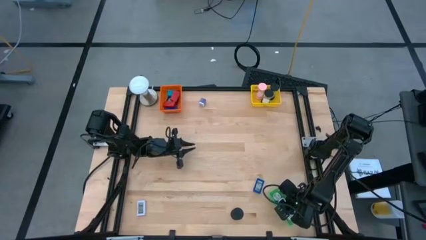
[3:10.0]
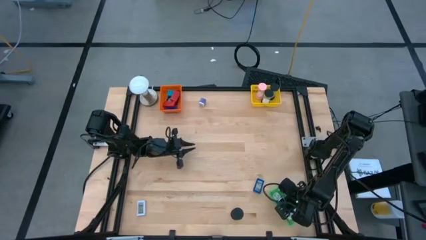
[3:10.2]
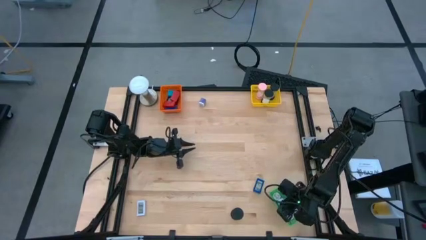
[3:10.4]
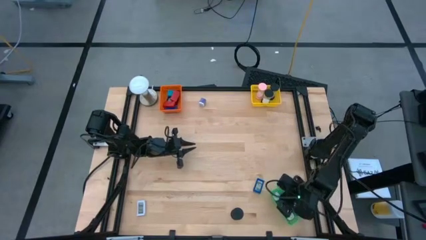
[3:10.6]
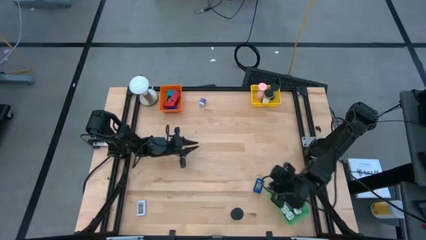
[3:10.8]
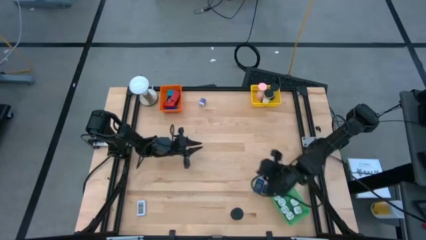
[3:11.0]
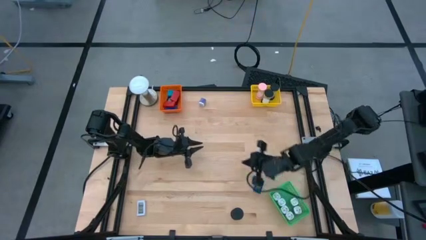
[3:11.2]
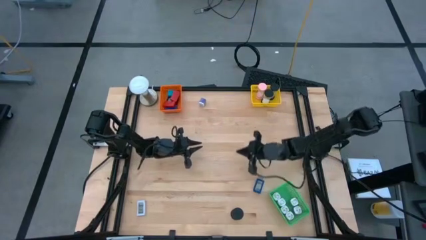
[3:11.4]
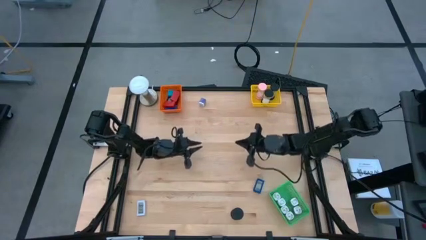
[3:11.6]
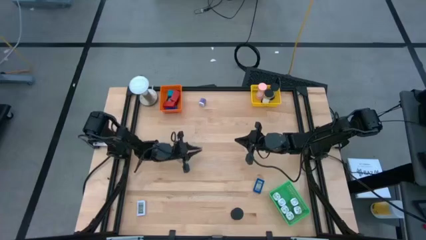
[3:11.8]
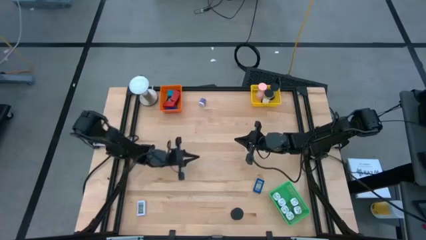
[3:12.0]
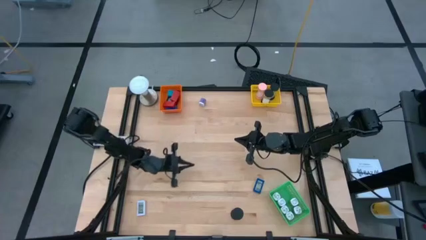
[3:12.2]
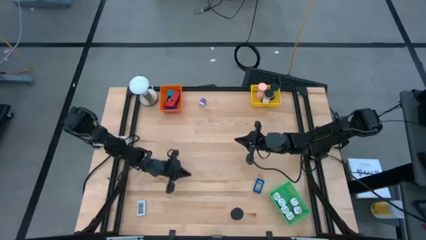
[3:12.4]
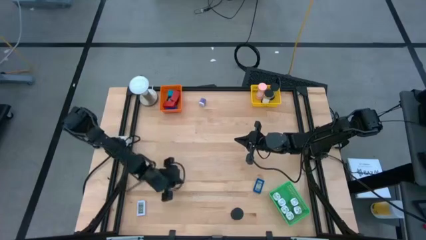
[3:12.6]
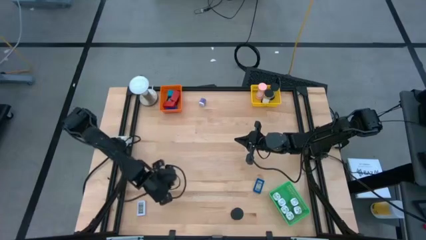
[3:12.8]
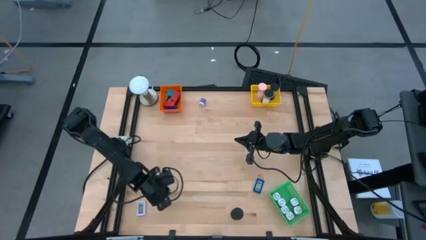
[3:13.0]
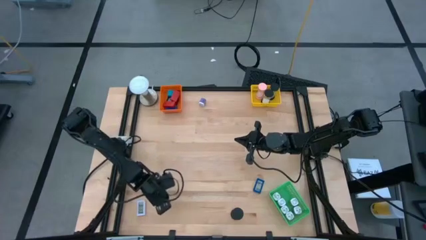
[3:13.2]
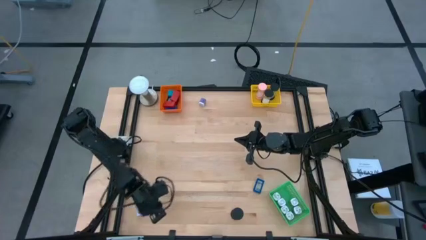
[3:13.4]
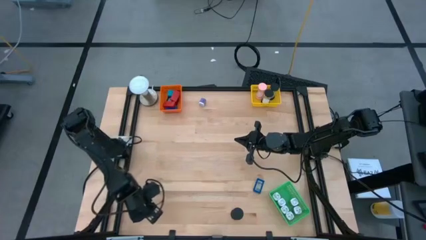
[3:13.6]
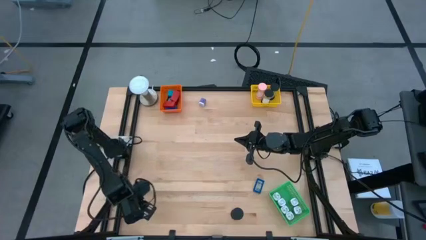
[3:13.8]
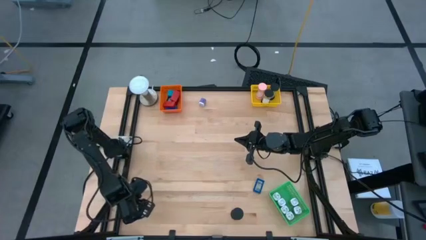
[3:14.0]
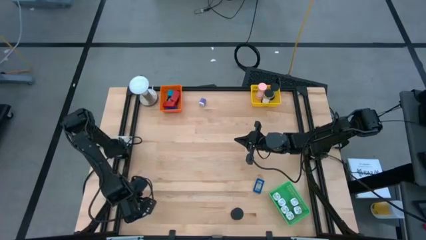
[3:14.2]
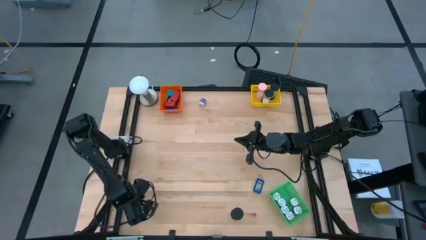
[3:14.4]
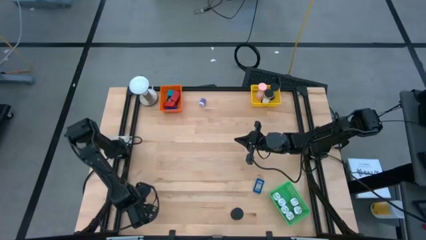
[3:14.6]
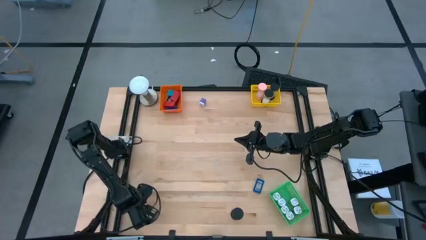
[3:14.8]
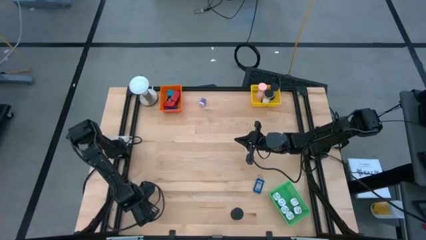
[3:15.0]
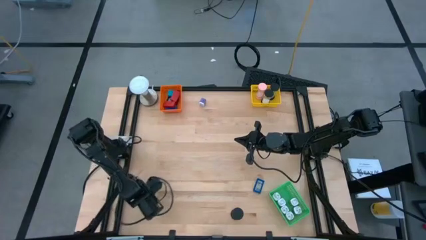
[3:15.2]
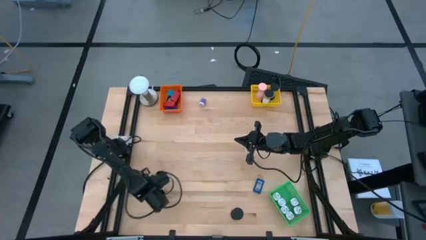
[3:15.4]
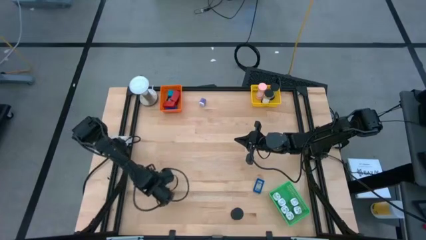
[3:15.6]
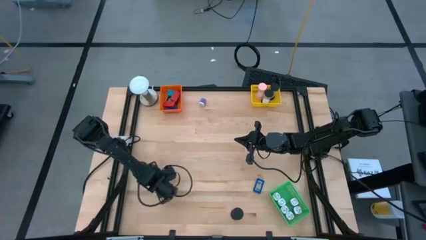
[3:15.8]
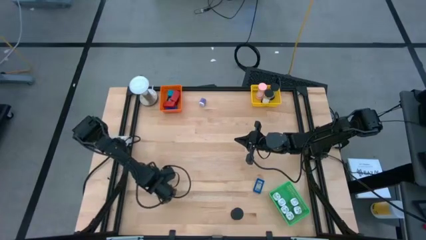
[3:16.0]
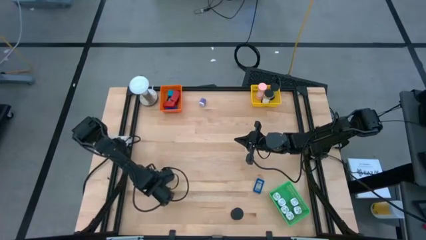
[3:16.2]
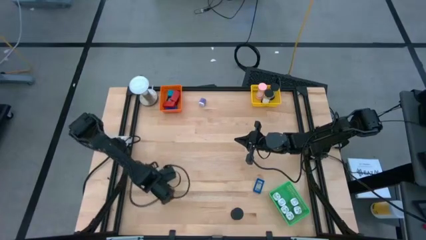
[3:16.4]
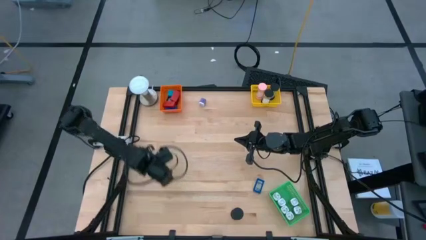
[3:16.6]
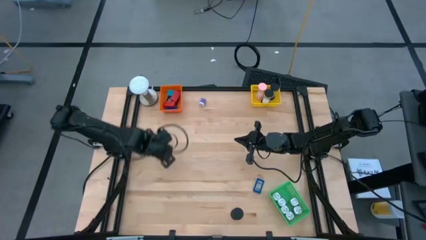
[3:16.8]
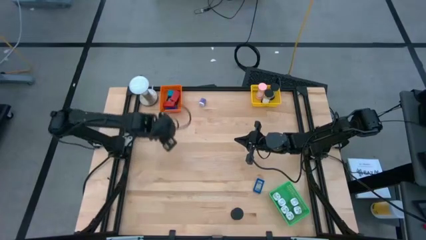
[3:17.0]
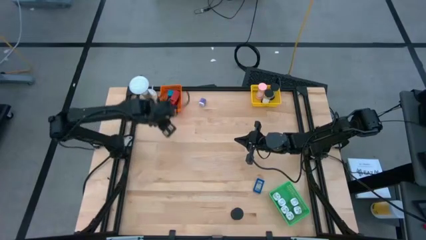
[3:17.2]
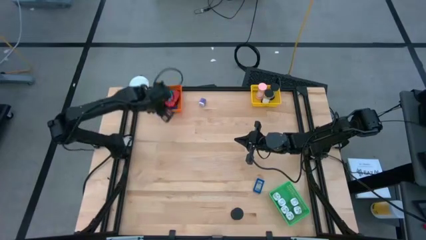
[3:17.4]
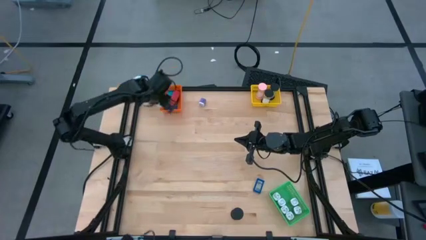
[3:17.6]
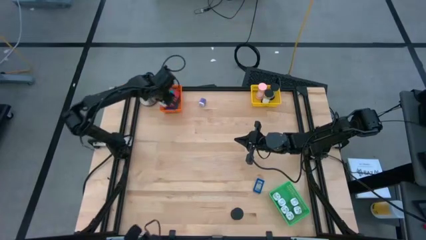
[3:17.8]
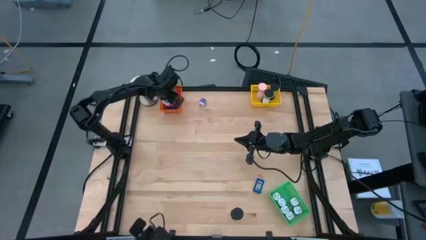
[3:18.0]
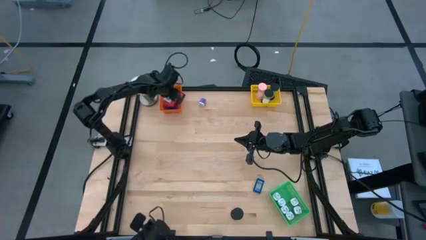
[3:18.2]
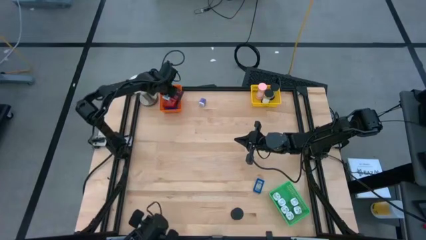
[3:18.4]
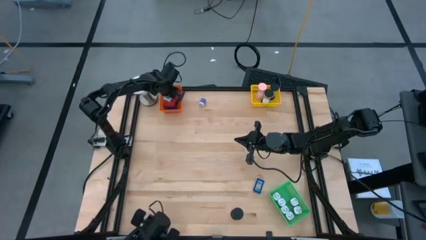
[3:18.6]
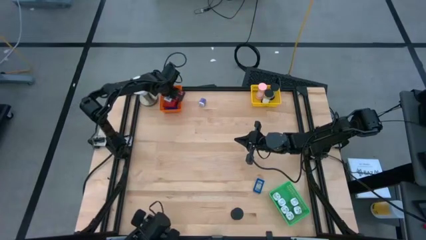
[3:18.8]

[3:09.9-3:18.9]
Task: Pick & Place Office items
Put the white digital clock into the orange bin

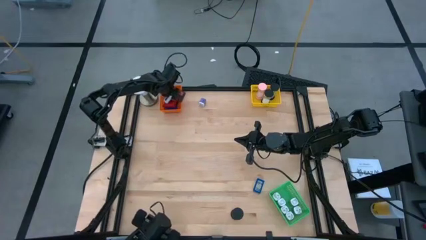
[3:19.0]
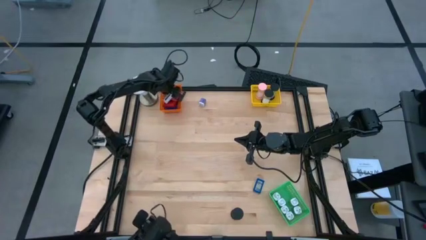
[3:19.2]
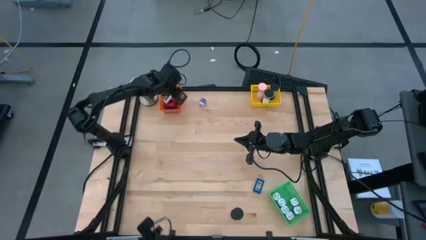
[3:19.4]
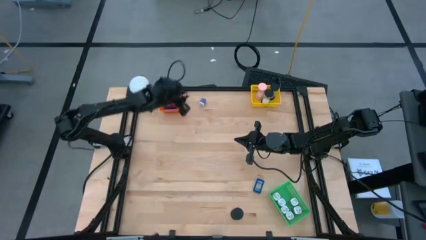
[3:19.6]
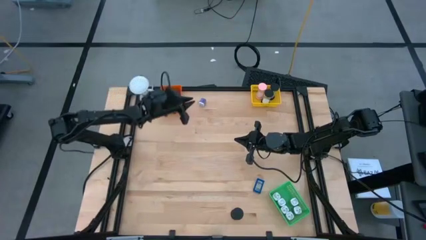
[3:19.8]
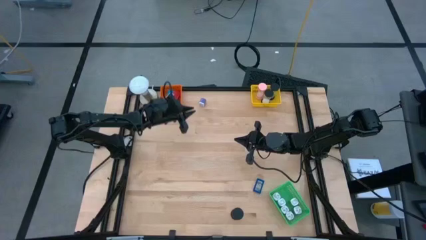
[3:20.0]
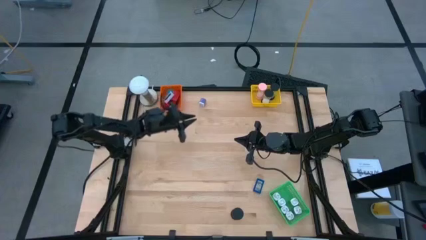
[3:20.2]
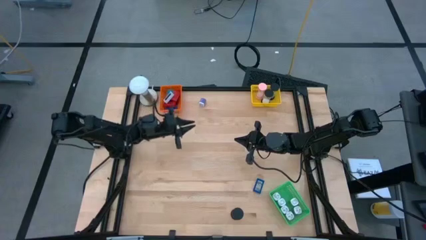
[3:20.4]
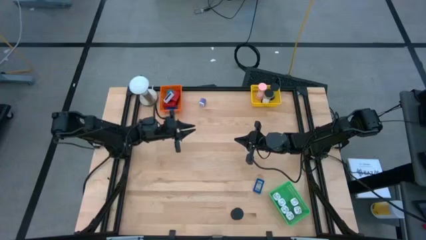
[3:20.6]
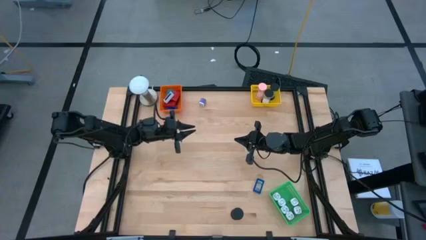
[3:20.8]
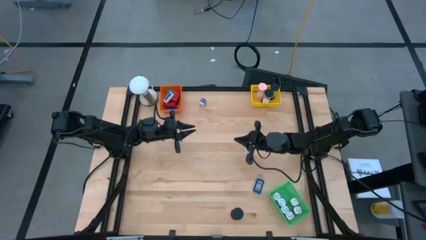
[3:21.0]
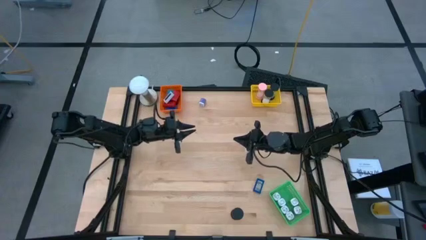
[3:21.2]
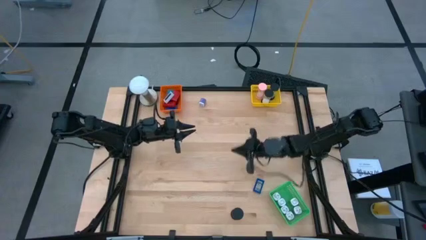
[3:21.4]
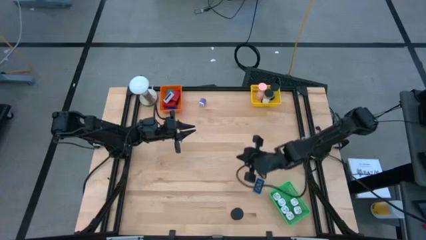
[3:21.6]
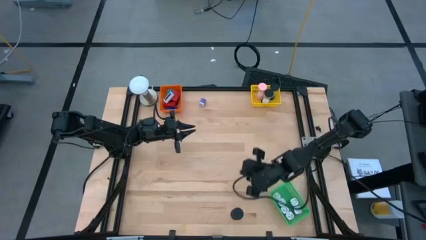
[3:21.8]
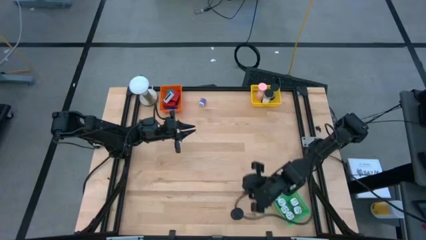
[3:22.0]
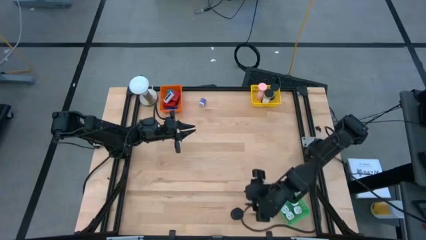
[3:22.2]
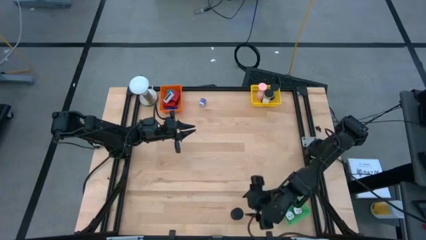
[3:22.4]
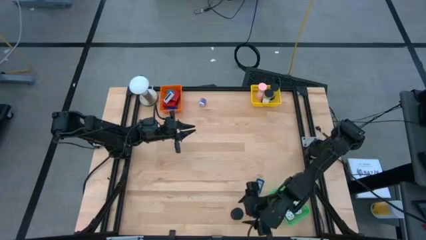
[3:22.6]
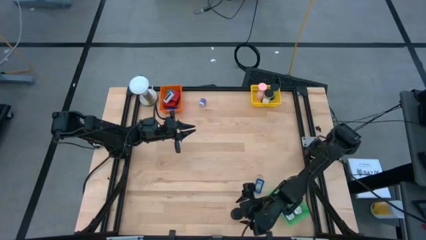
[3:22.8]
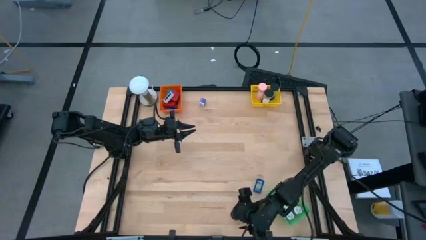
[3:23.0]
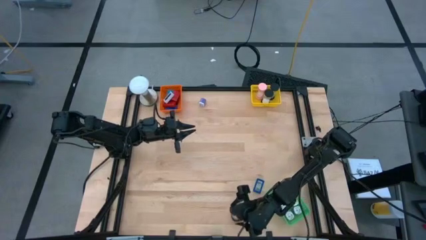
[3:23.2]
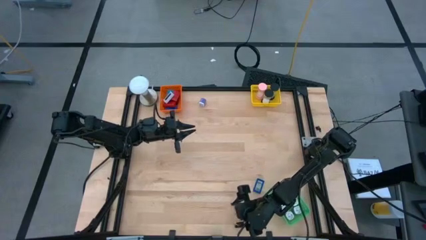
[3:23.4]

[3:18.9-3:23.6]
Put the orange hourglass into the yellow bin

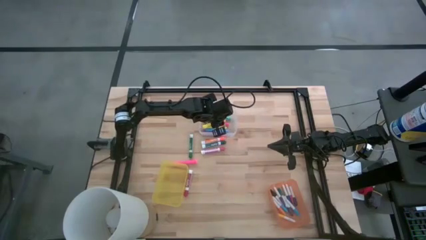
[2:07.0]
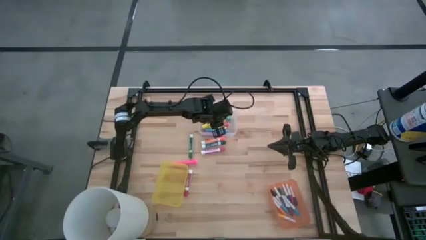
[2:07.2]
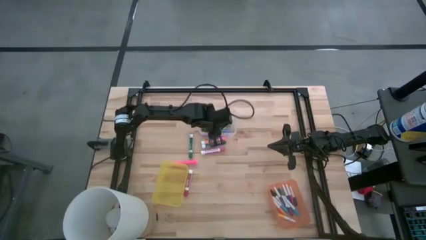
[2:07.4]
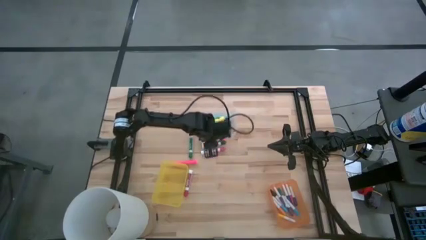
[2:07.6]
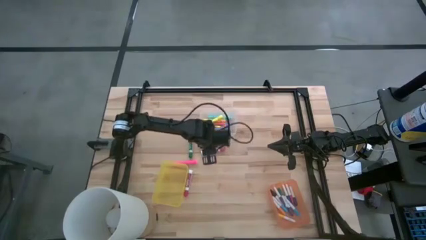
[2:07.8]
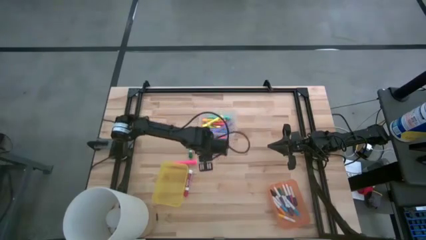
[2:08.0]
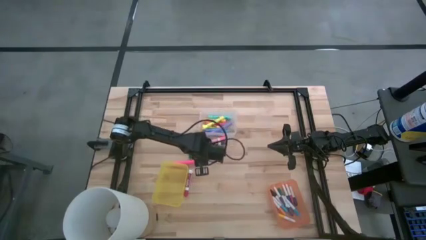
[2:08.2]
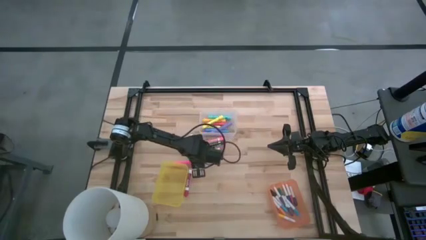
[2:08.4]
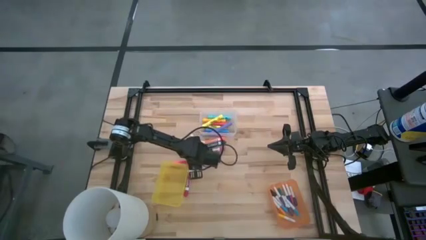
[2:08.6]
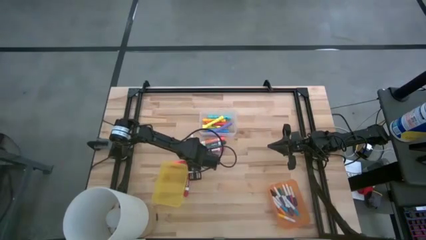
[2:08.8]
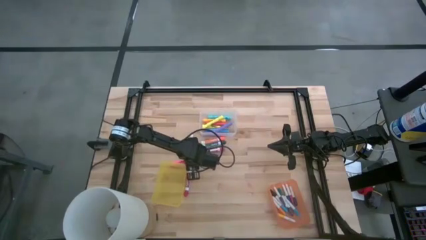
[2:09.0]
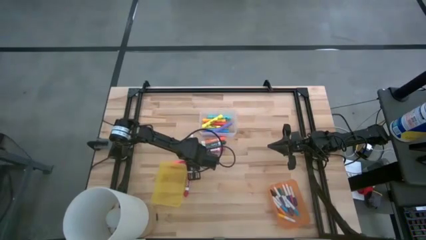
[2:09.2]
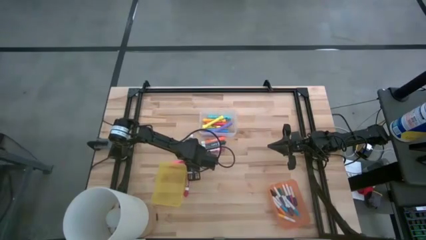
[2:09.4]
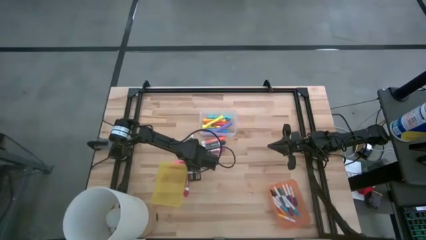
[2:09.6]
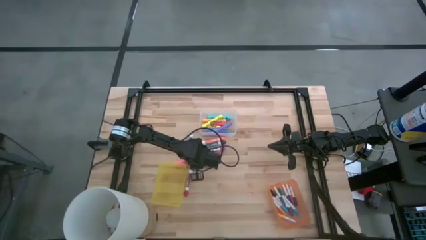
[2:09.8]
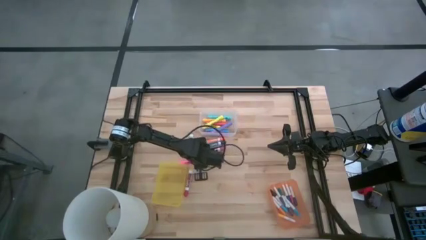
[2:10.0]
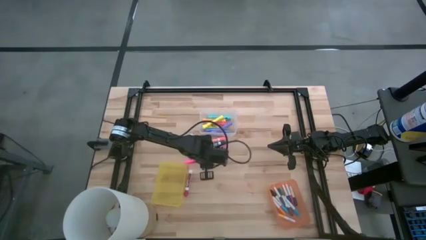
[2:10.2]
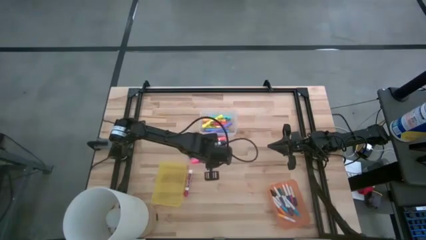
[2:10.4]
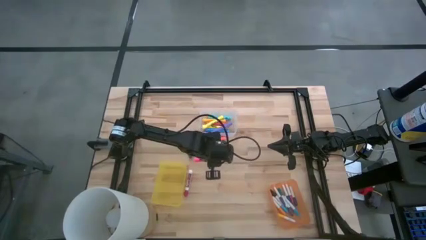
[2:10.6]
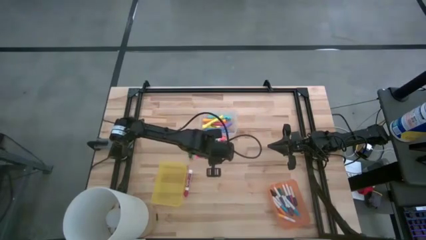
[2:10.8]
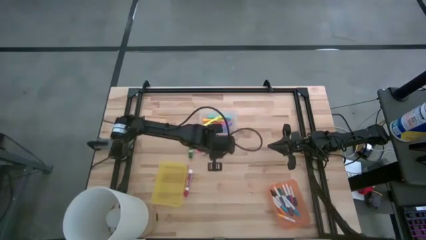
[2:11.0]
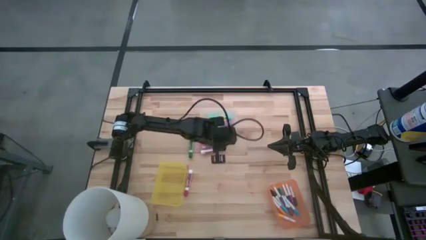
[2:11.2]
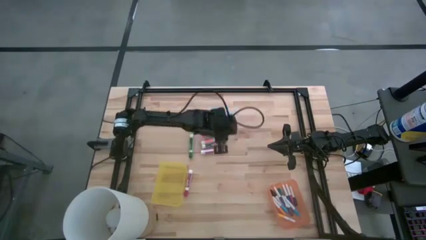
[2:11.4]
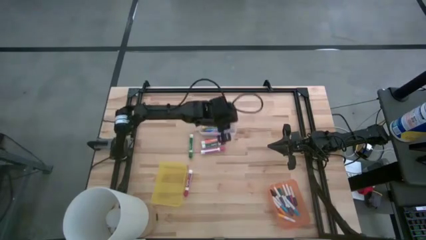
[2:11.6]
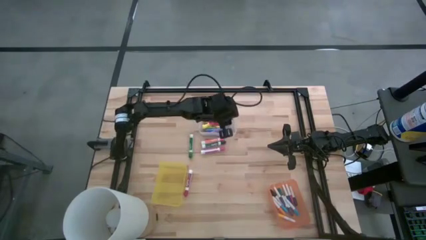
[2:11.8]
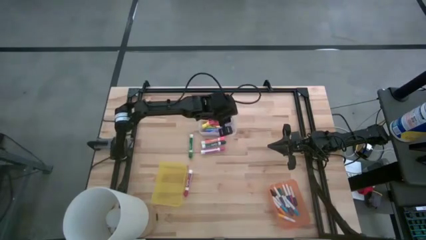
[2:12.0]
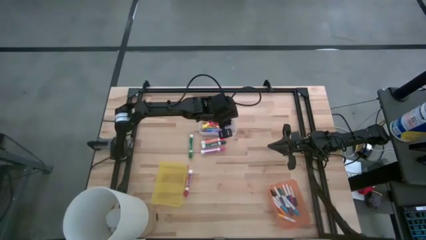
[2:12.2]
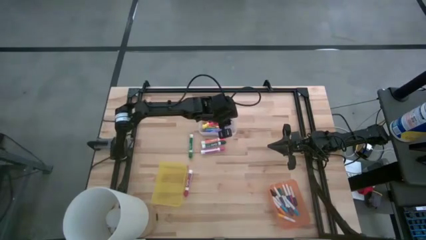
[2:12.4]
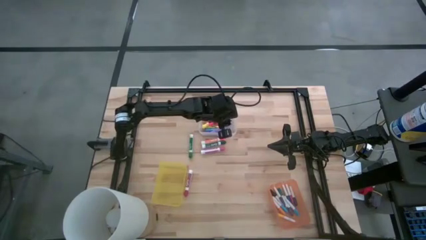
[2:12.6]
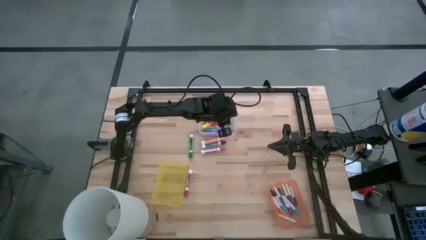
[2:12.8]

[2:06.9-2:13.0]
Task: Pick & Place Markers
Put the large pink highlighter pen into the transparent bin
